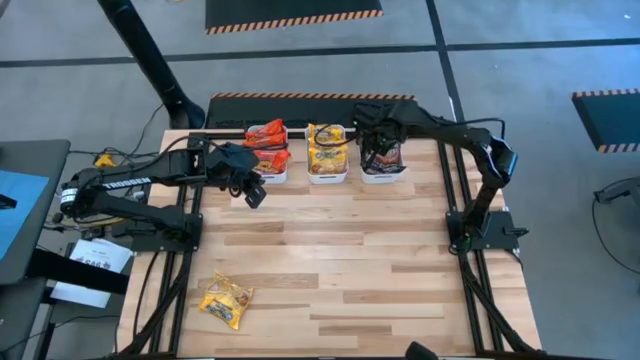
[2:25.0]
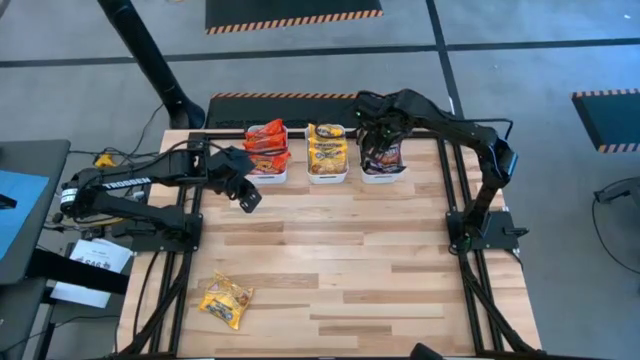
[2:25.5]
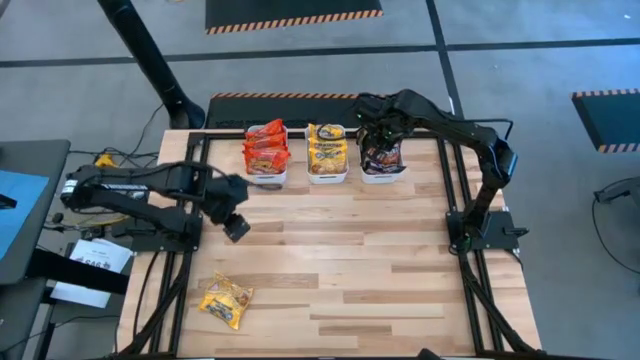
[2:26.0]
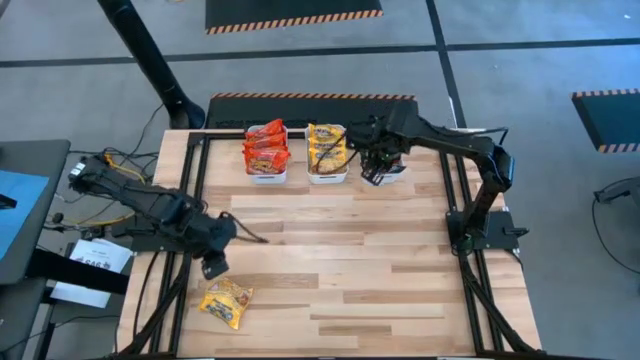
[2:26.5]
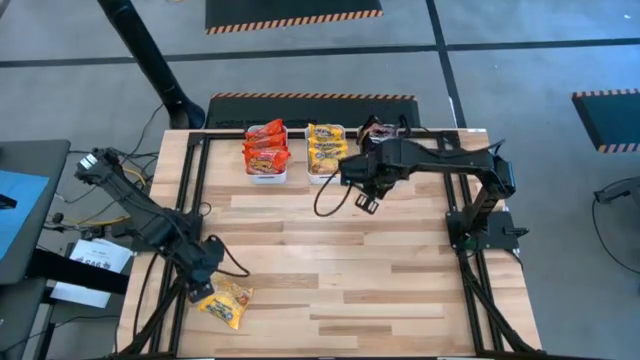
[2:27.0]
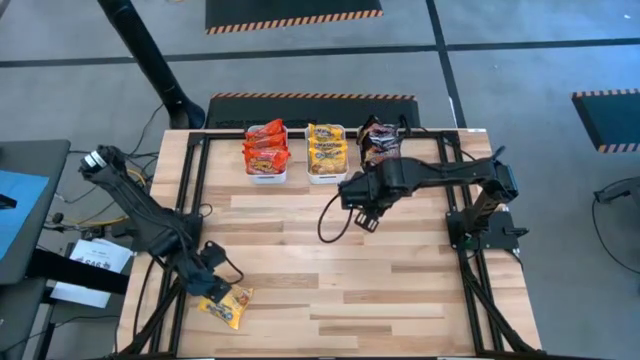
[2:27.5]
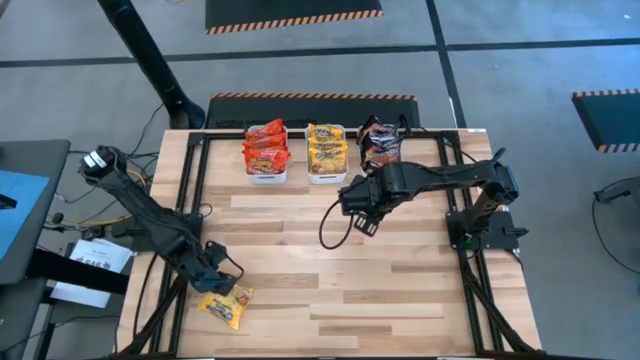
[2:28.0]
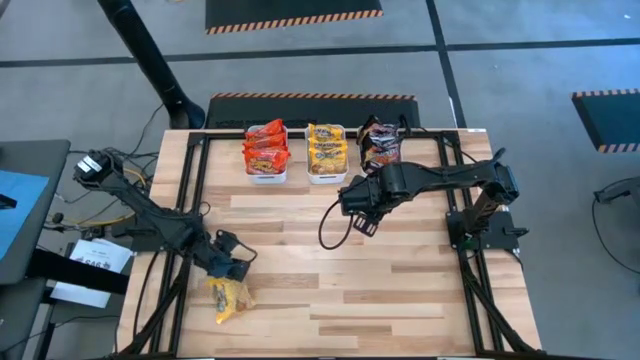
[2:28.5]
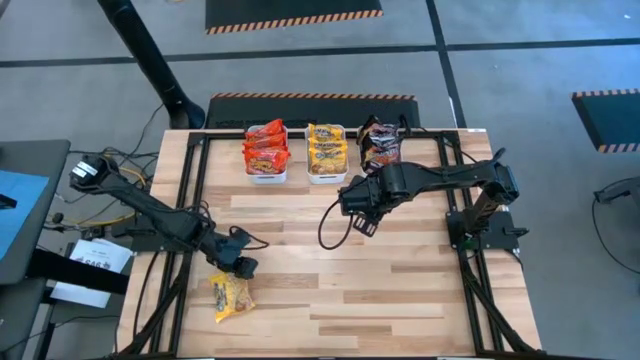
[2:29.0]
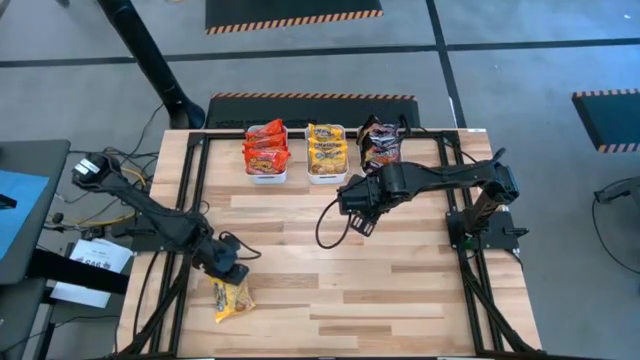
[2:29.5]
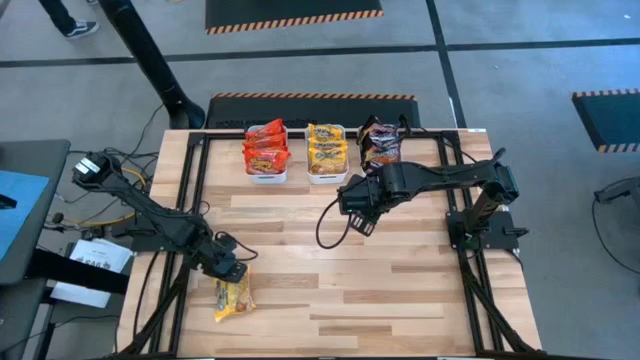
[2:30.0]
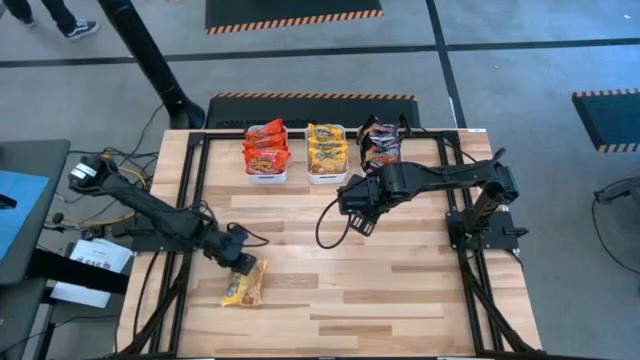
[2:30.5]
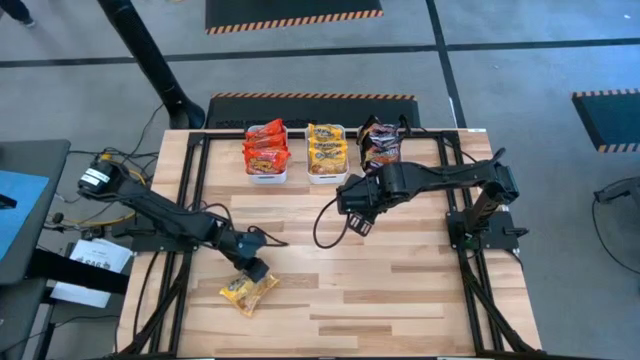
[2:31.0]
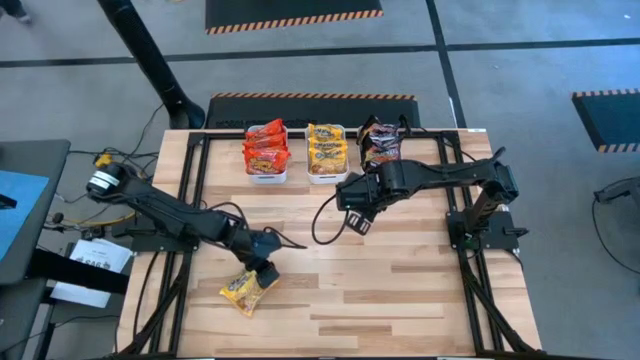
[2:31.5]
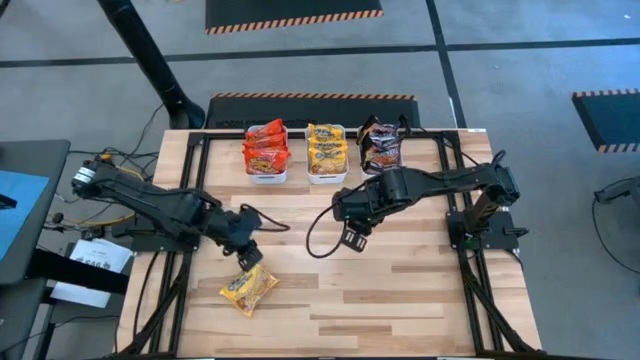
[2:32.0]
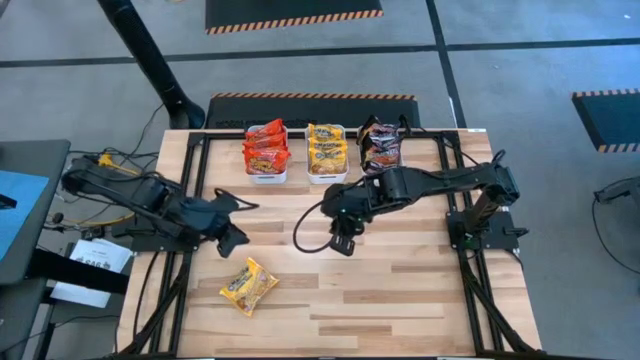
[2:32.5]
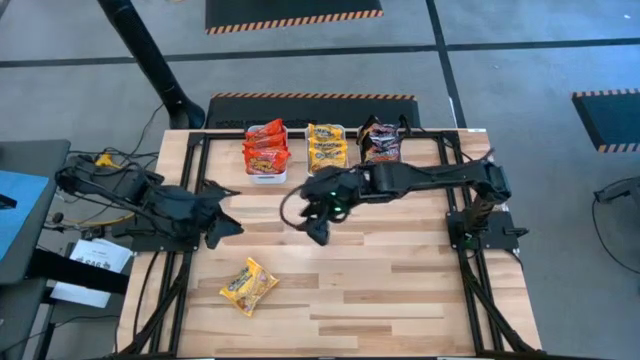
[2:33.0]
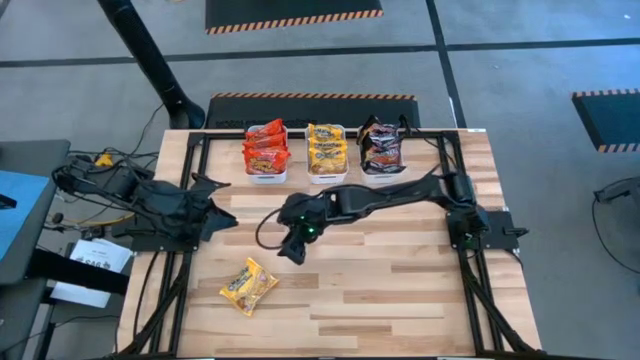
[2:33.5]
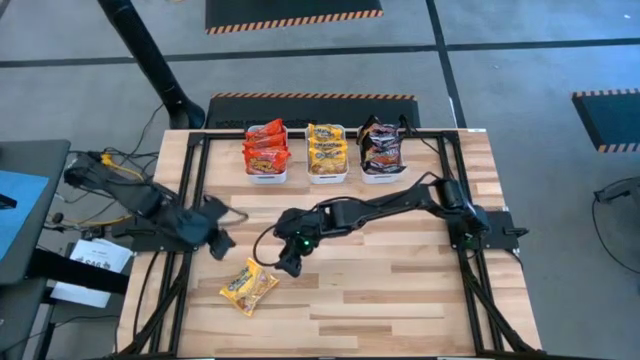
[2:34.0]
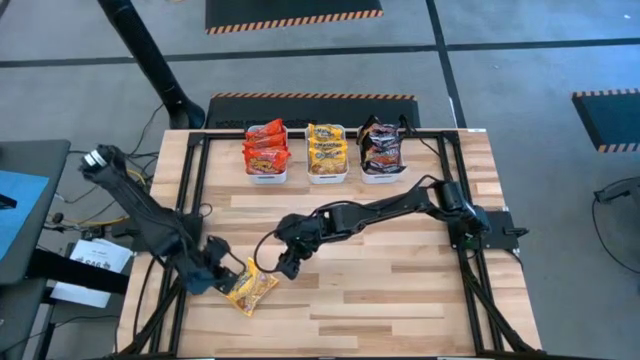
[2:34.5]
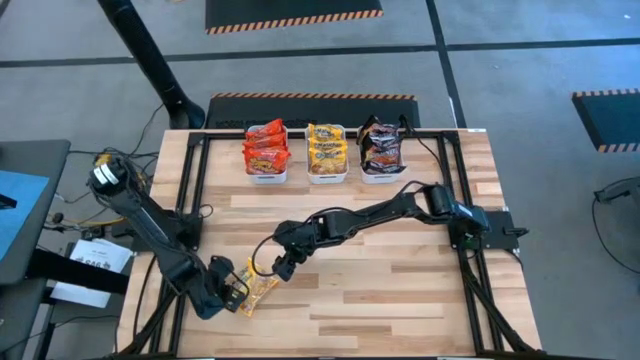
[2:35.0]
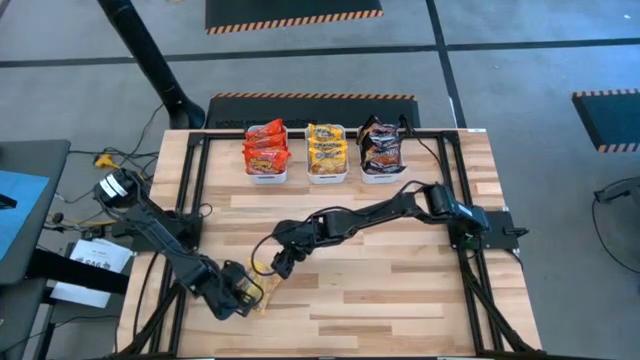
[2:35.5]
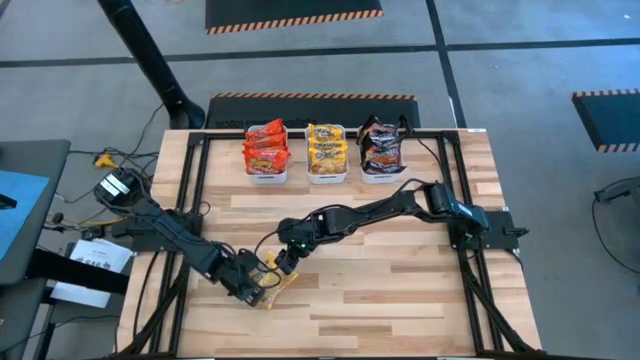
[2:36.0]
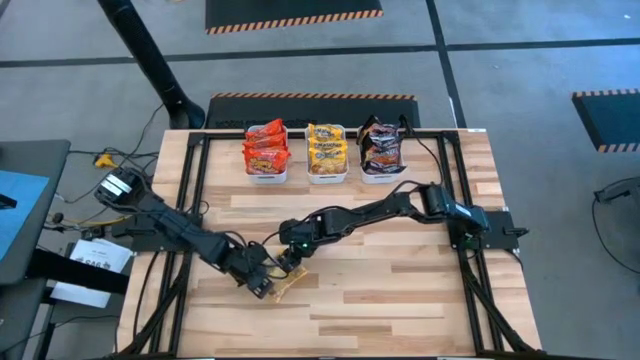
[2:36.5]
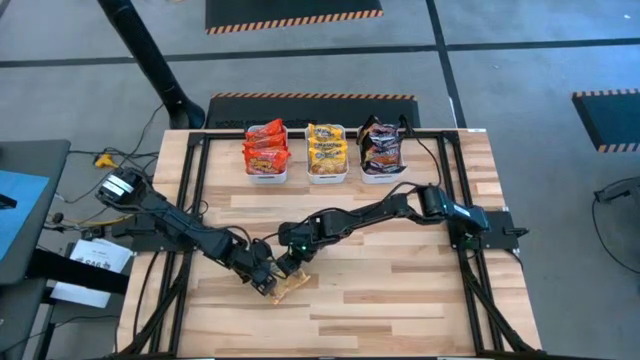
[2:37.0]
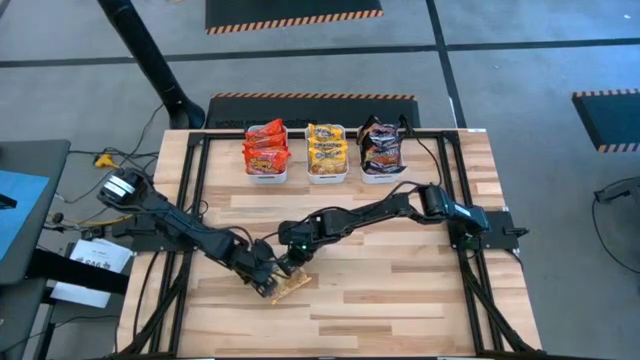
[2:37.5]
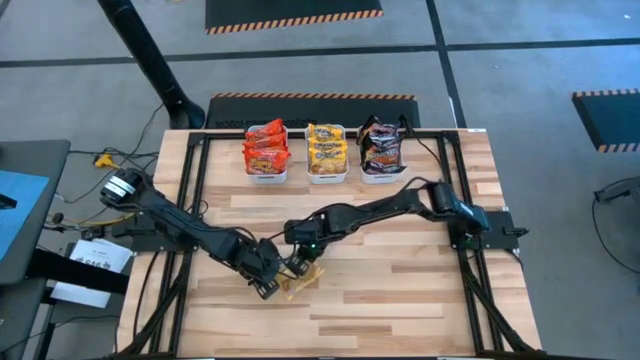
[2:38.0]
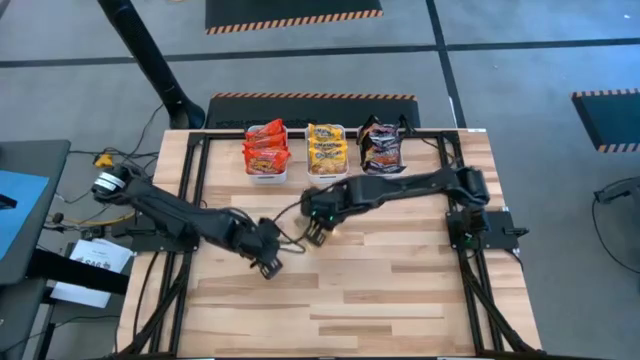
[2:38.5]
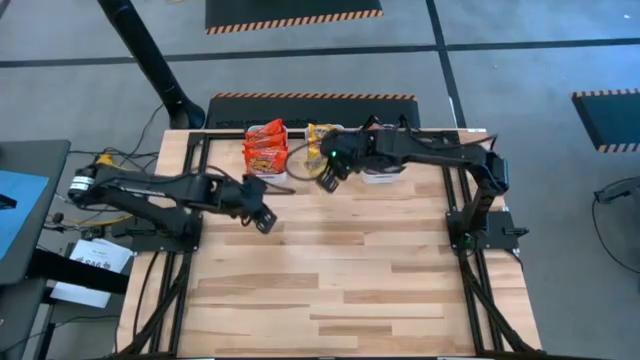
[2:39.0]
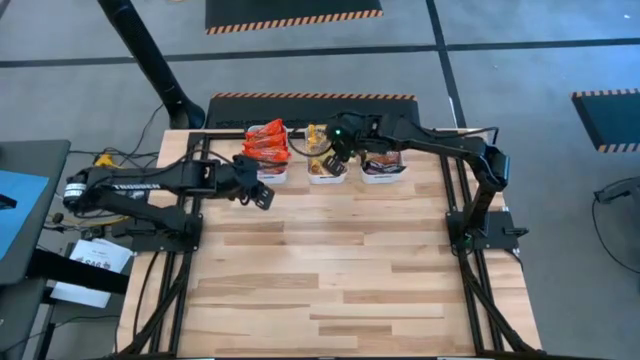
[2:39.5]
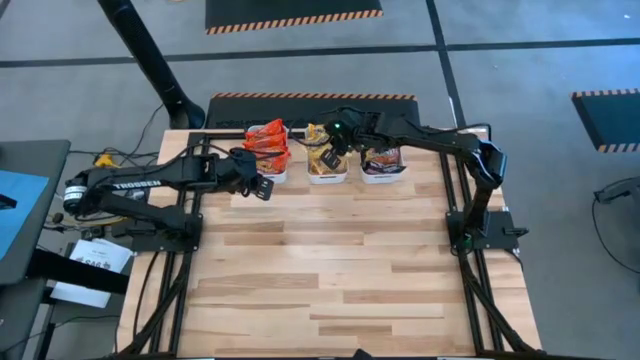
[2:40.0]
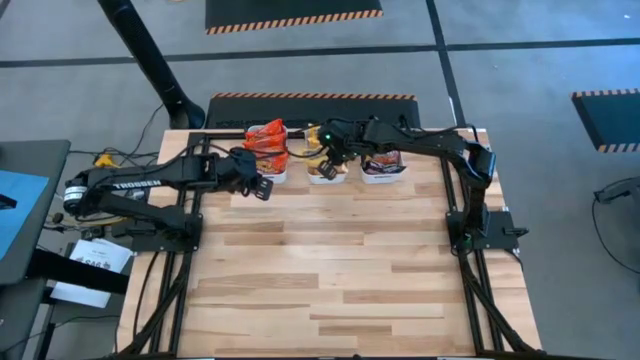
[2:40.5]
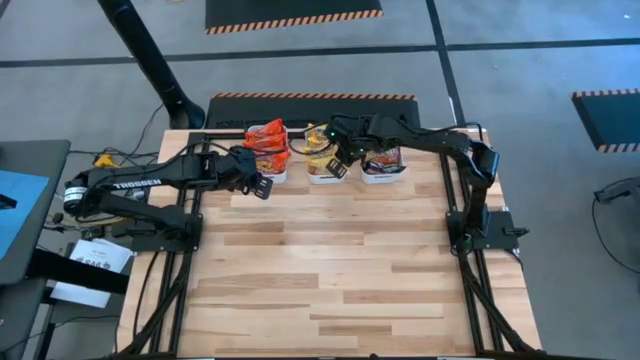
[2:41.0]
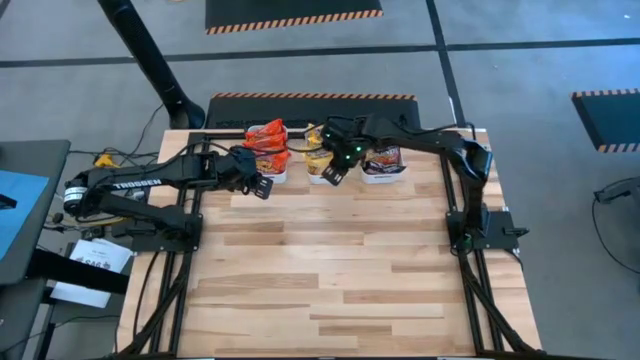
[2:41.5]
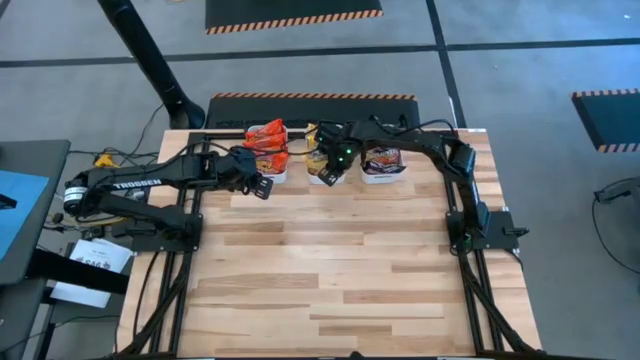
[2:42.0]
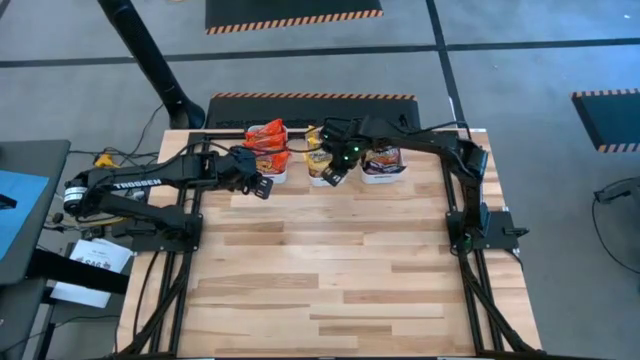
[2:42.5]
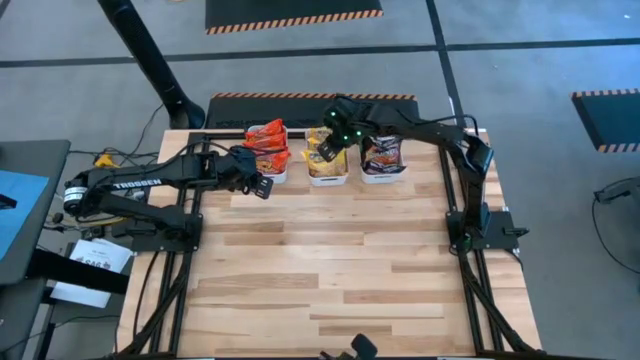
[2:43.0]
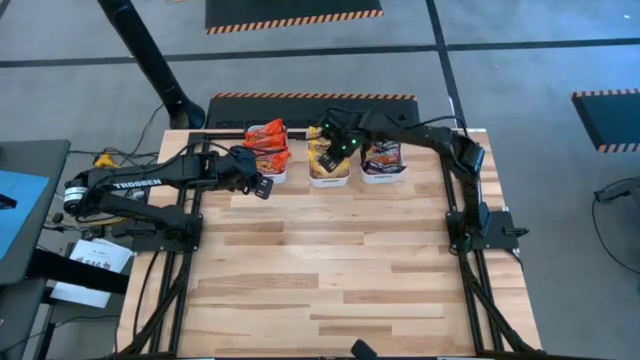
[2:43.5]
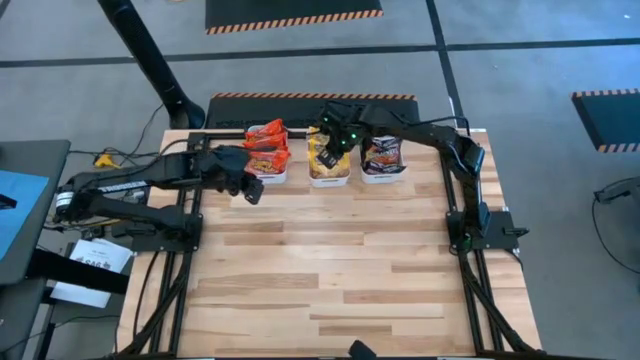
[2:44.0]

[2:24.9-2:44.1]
Task: Sort Maruchan noodles
Put the yellow noodle pack into the middle white bin

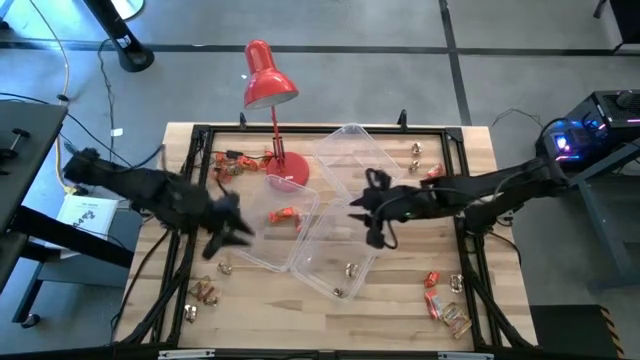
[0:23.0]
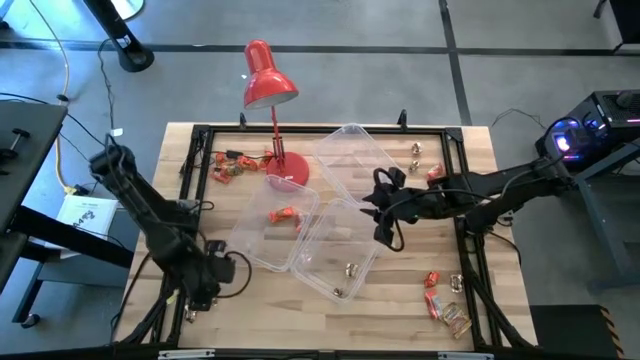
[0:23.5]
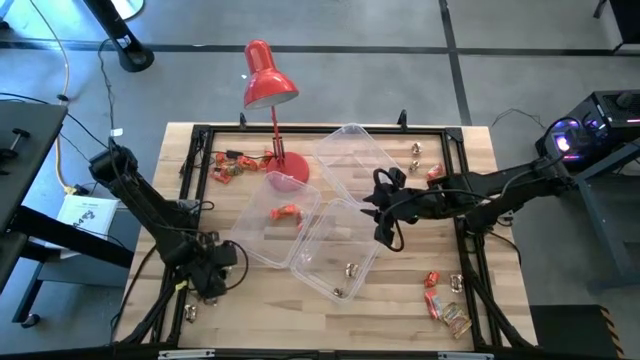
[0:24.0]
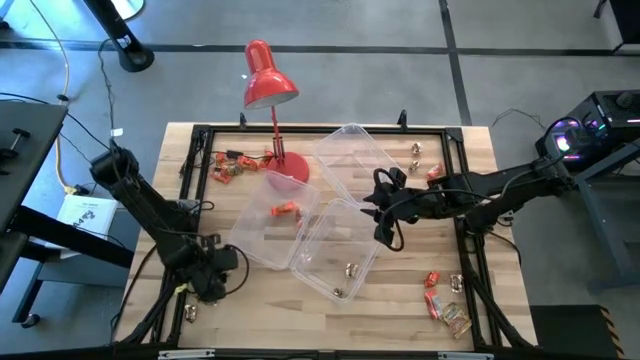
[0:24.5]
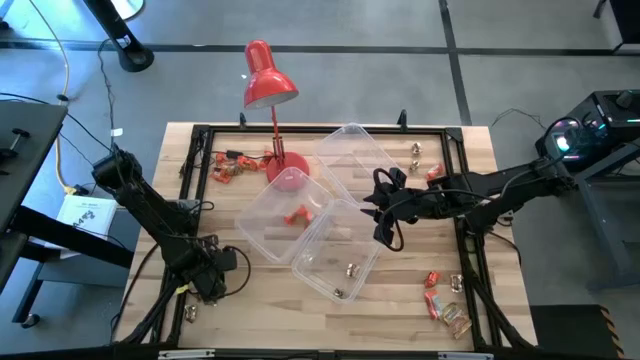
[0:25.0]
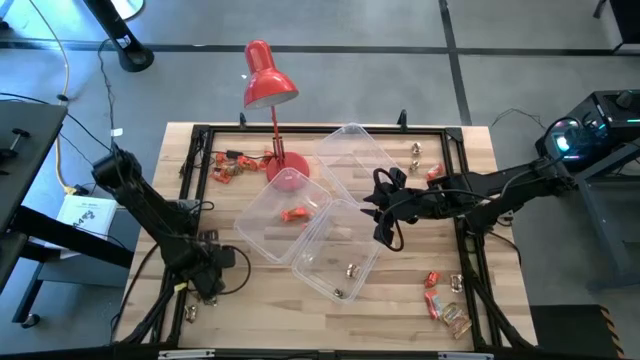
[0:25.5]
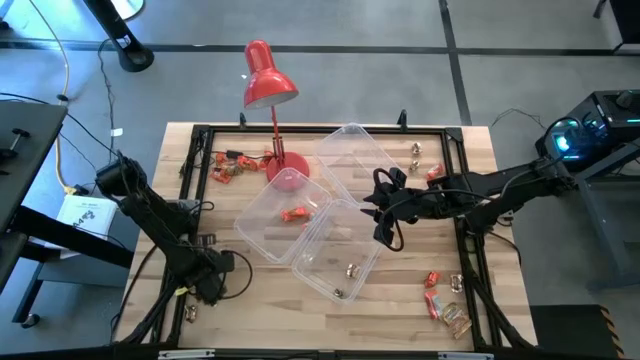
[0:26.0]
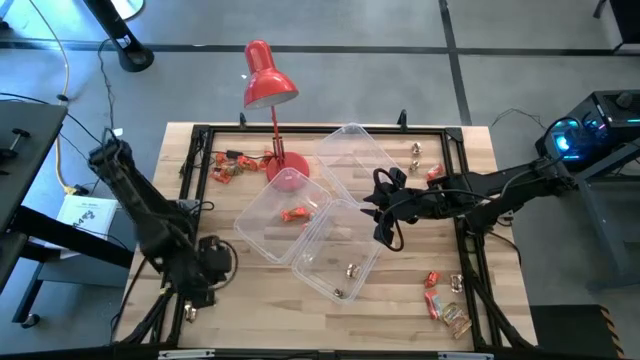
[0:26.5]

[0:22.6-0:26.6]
Task: Sort candy
Put the gold candy into the bottom left transparent bin
